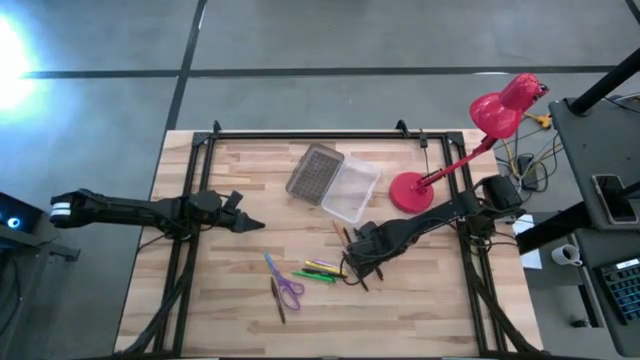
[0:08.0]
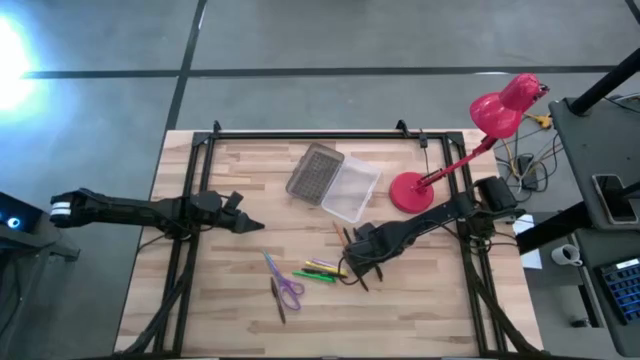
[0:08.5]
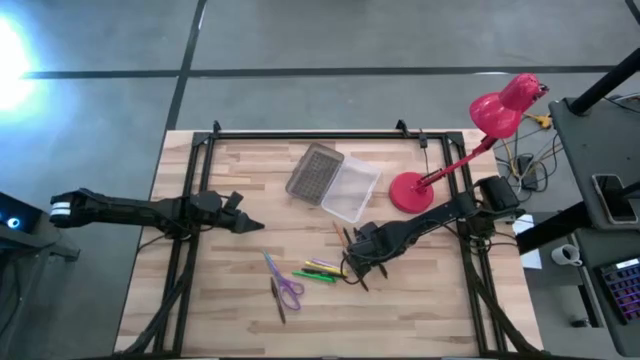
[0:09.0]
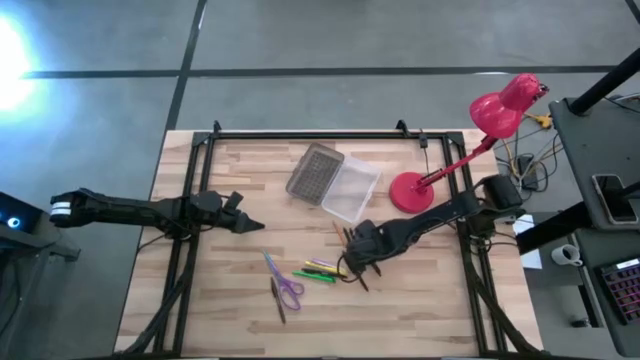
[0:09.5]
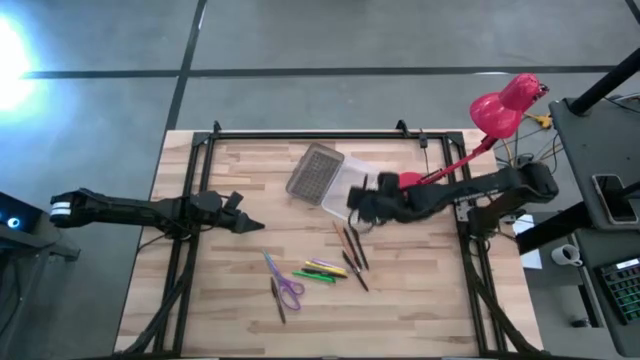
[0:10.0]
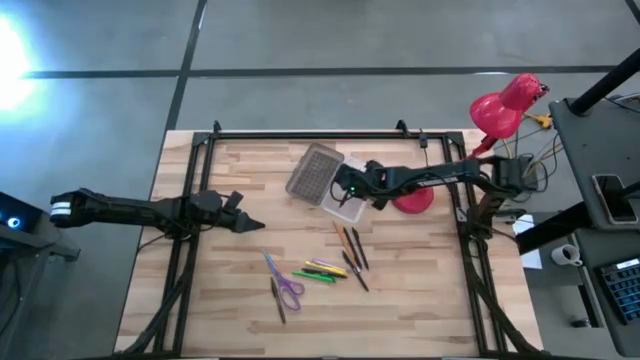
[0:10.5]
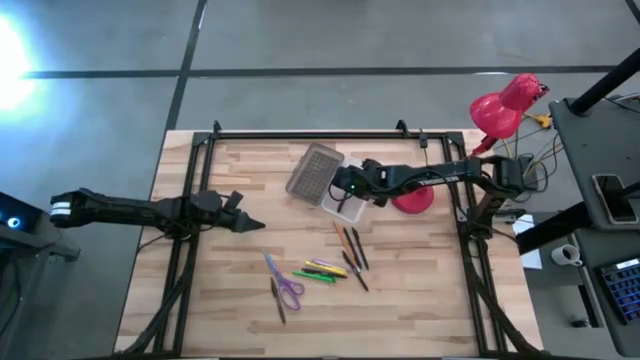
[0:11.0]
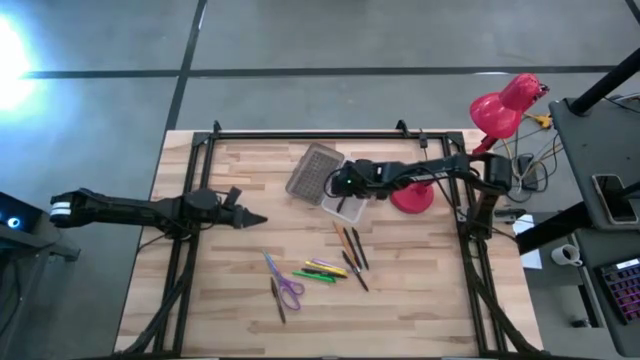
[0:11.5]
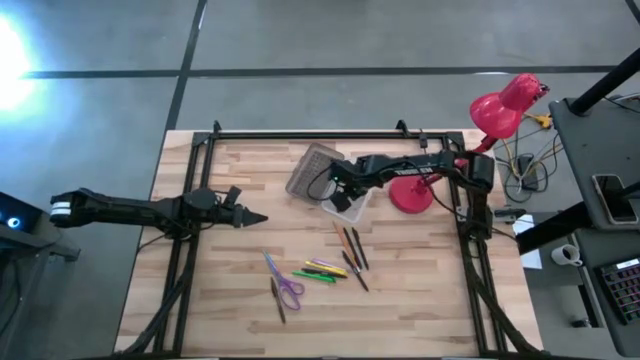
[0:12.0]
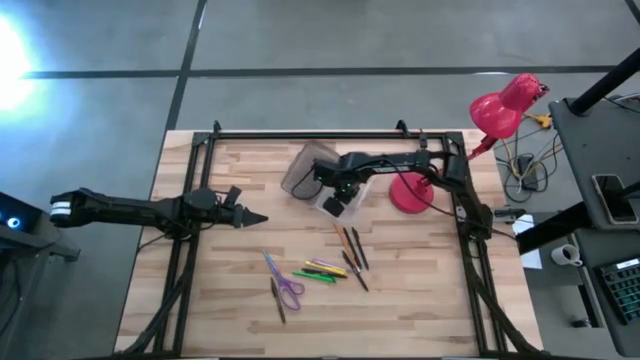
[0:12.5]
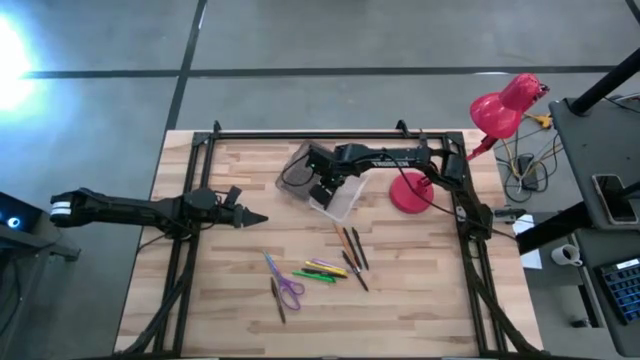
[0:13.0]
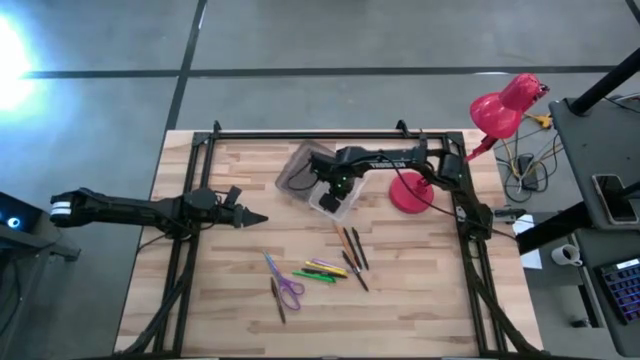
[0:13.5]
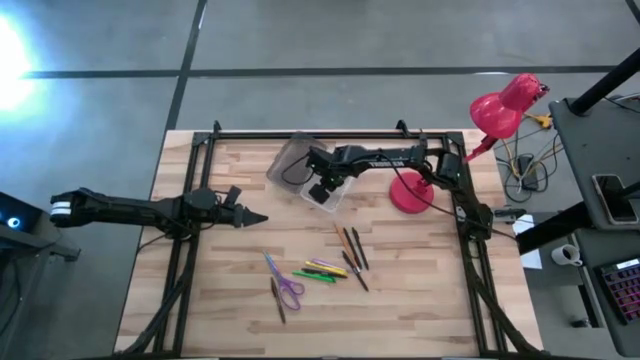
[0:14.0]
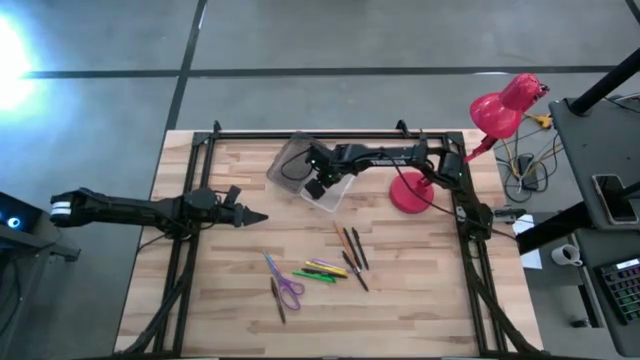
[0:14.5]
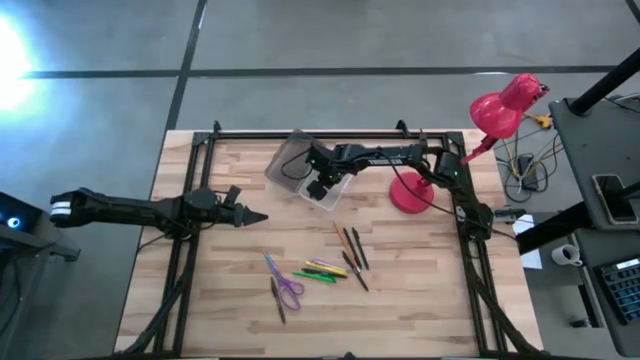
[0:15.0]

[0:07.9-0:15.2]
Task: Pick & place school supplies into a supply box
Put the black pen into the black supply box

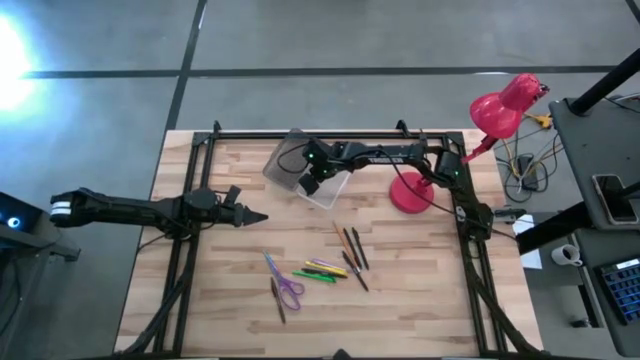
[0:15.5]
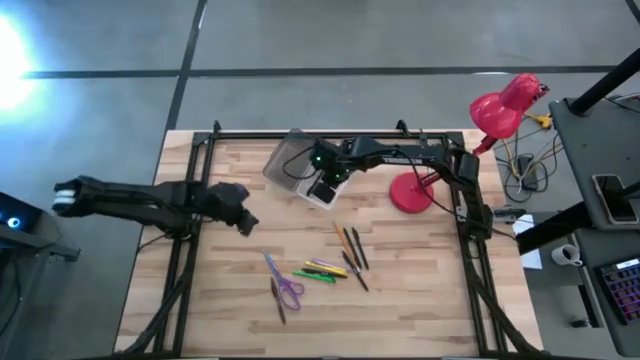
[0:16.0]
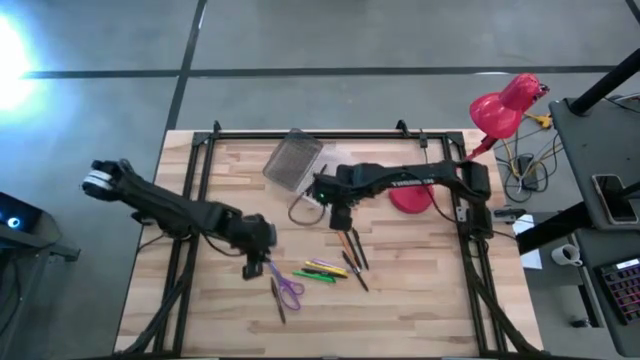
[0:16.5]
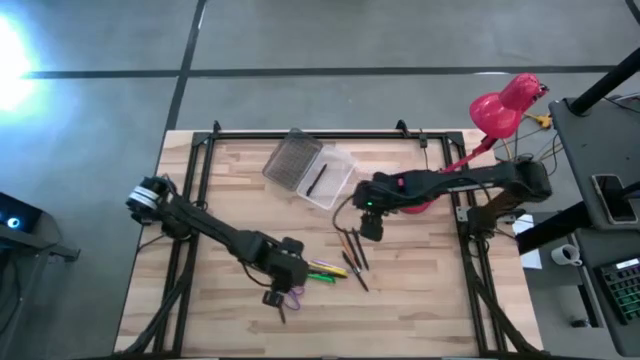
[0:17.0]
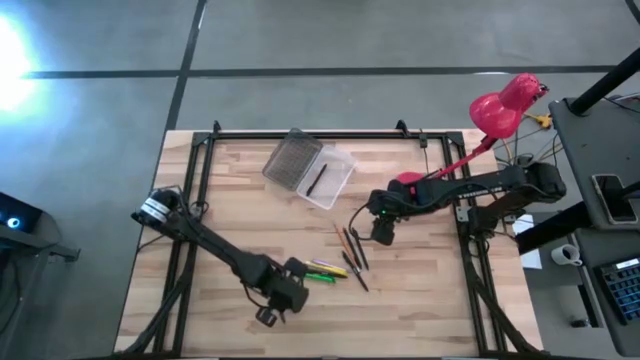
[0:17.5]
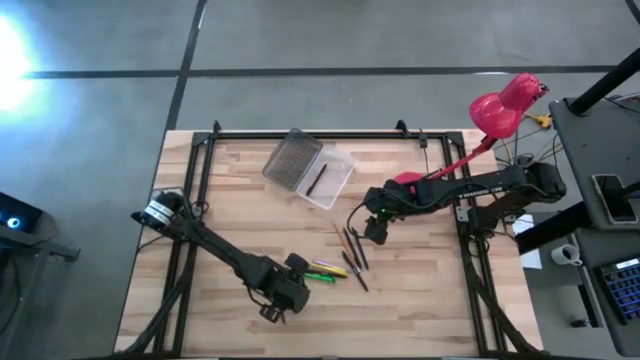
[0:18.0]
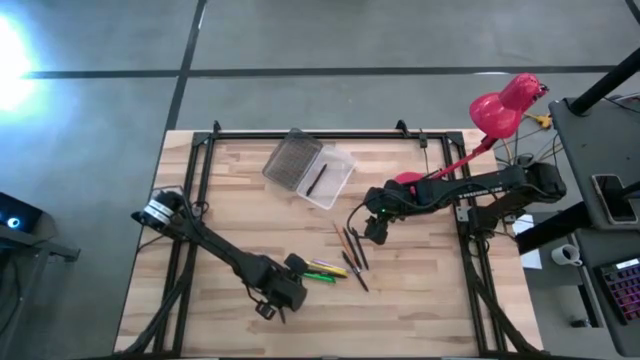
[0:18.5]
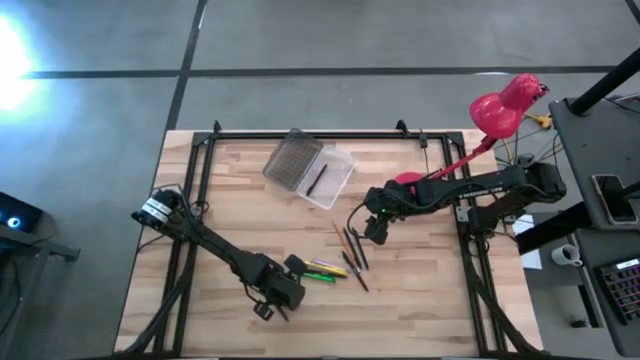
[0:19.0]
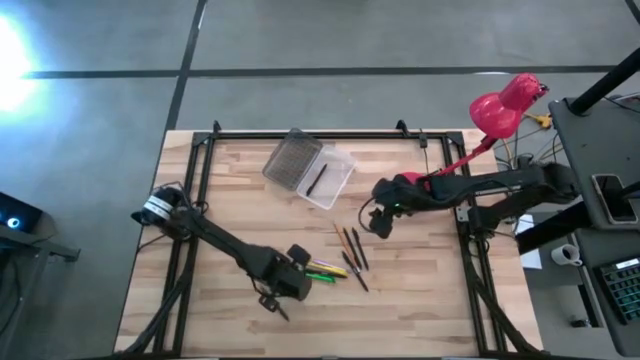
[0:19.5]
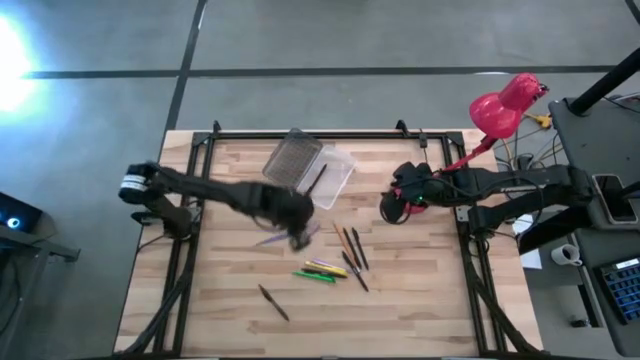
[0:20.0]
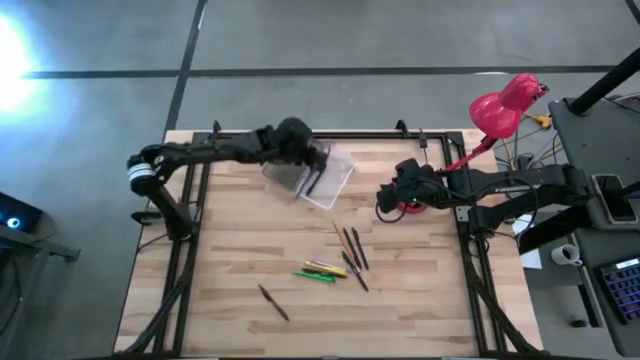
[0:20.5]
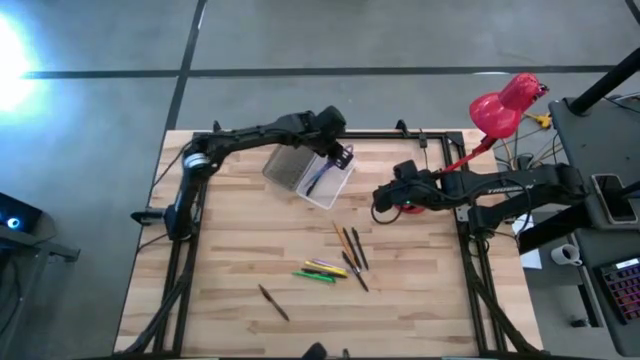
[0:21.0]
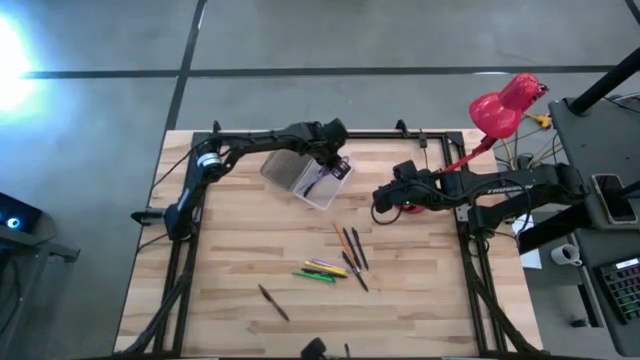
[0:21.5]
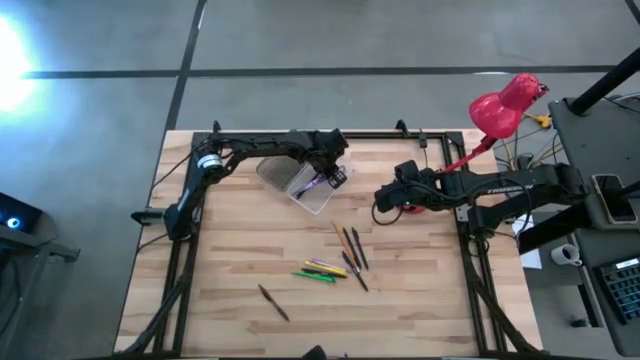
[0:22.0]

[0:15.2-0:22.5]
Put the violet scissors into the black supply box

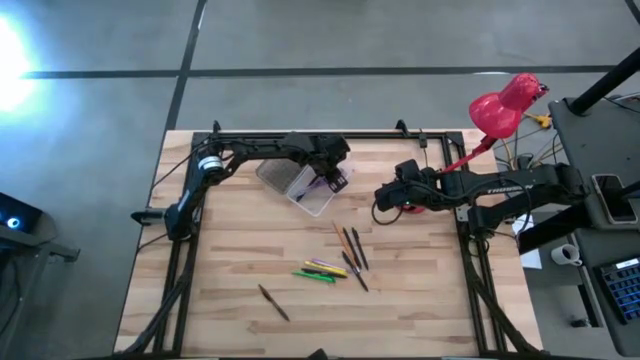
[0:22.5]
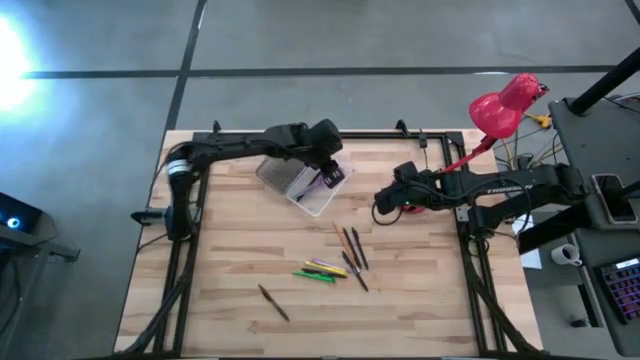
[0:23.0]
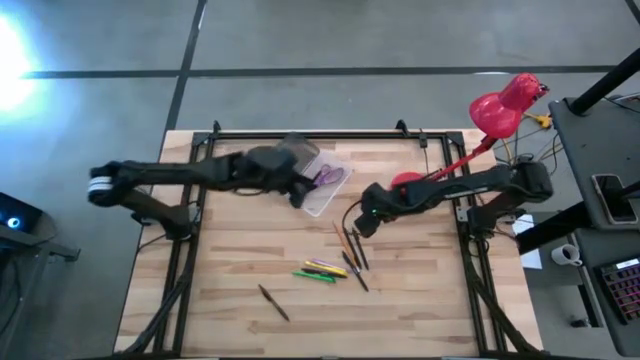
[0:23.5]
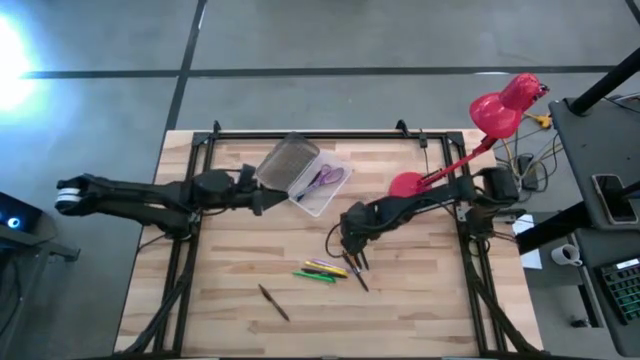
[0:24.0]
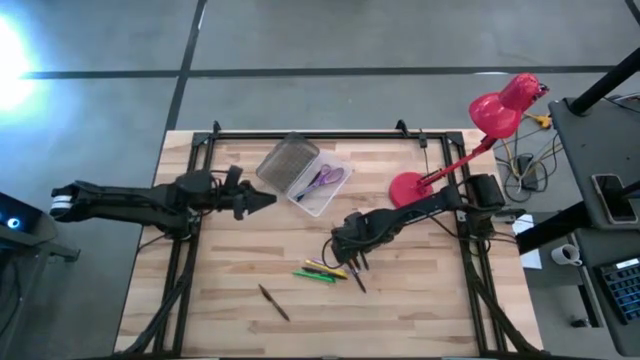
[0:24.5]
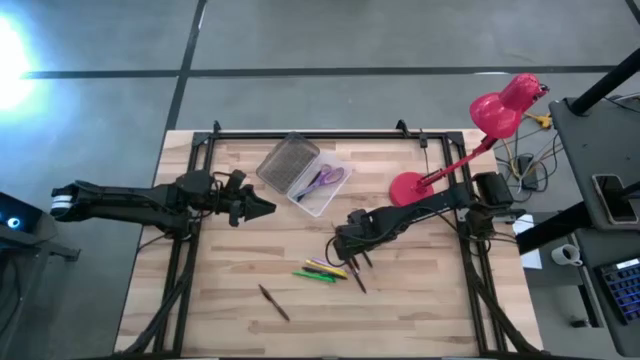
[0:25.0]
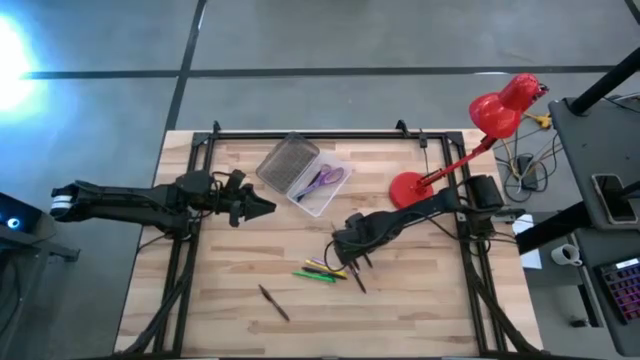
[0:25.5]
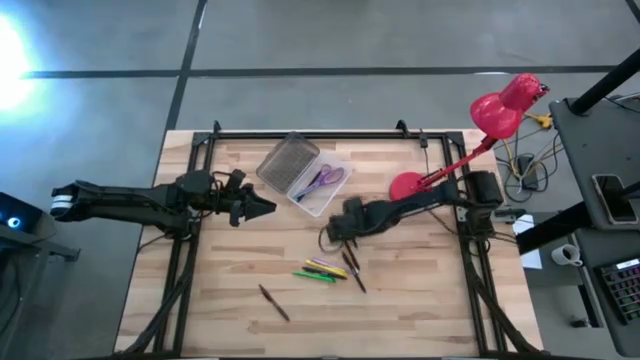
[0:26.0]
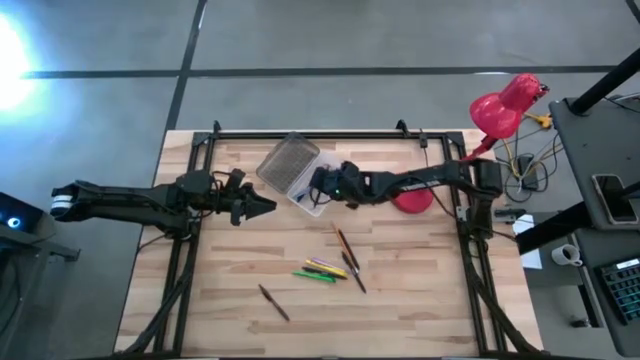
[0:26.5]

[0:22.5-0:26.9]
Put the black pen into the black supply box

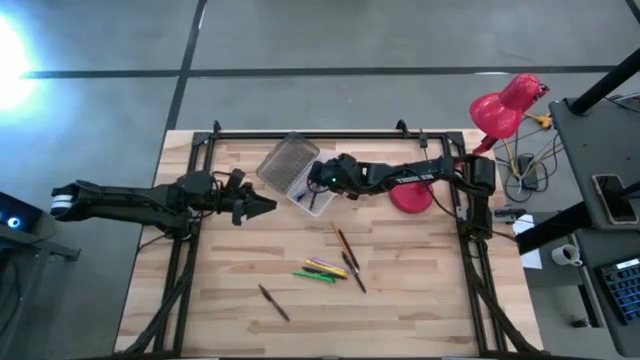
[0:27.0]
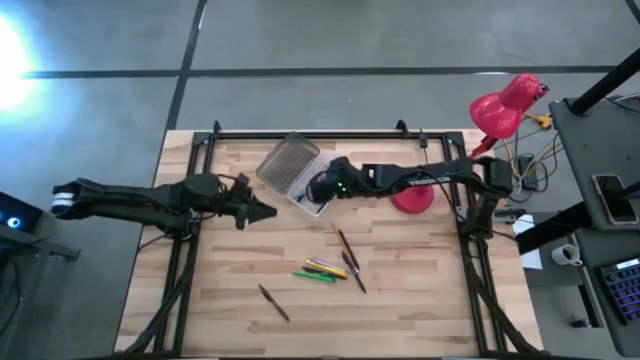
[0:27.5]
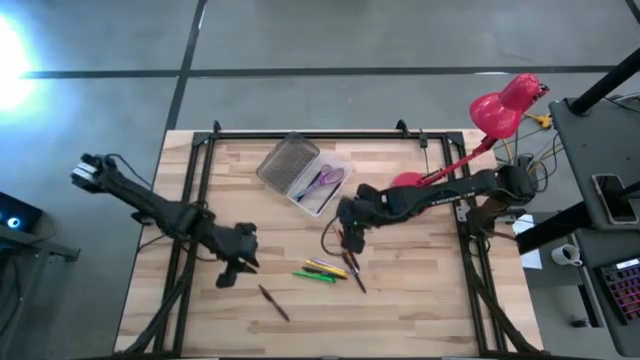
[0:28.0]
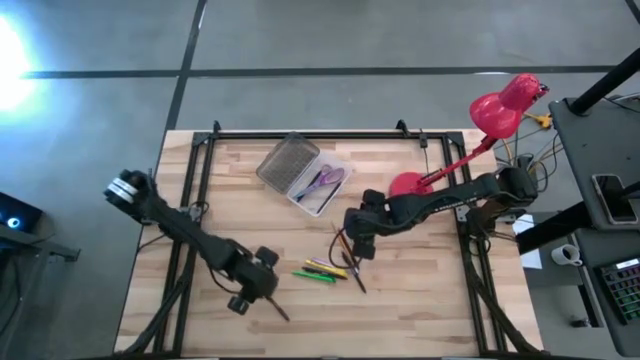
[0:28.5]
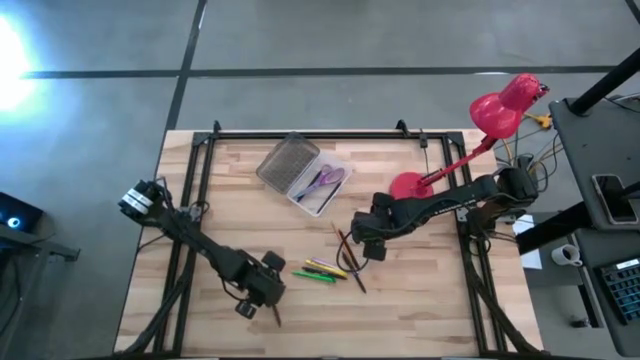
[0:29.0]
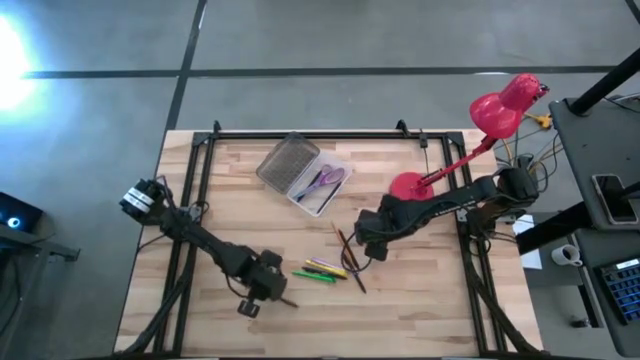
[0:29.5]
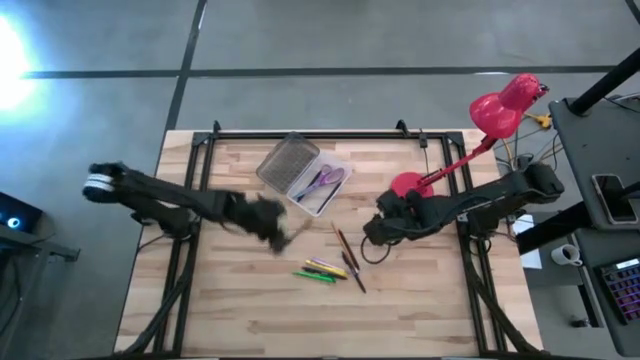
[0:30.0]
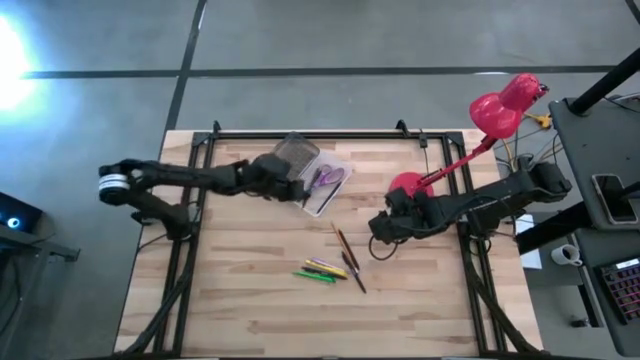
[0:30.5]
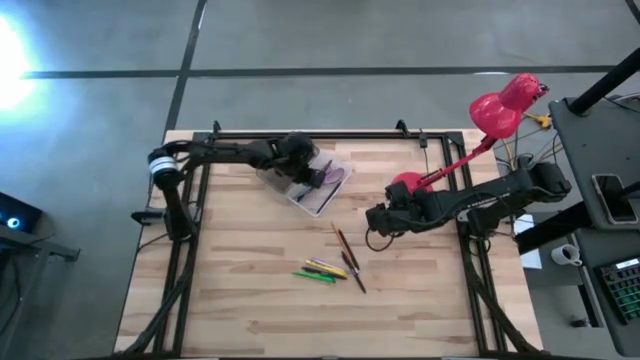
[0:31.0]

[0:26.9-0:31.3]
Put the brown pen into the black supply box
